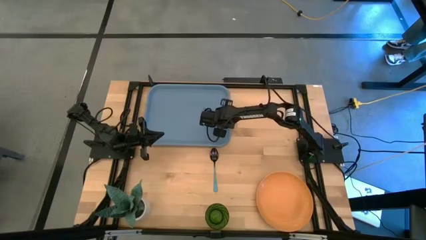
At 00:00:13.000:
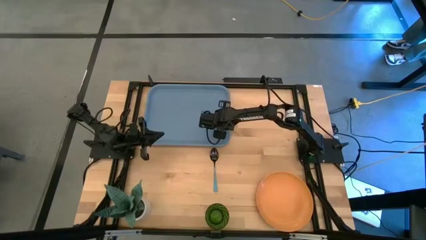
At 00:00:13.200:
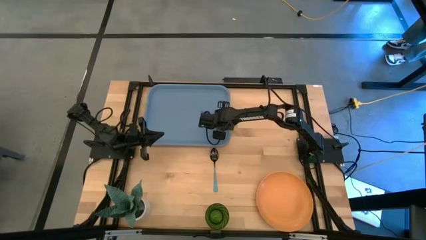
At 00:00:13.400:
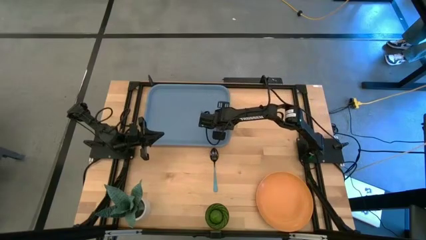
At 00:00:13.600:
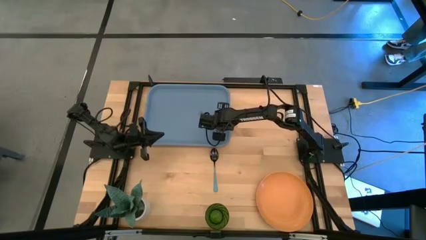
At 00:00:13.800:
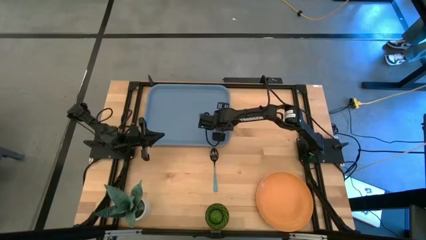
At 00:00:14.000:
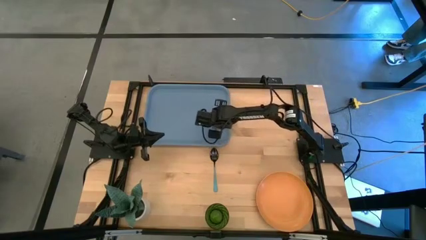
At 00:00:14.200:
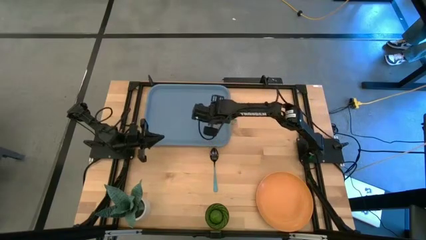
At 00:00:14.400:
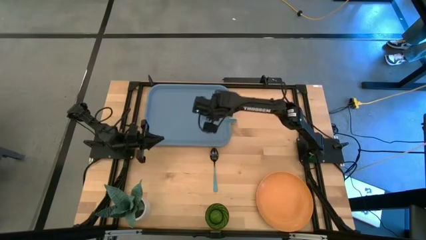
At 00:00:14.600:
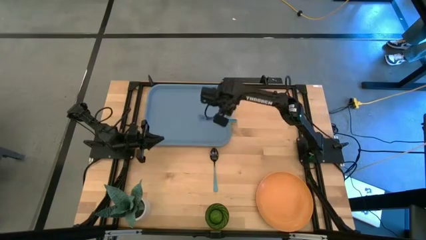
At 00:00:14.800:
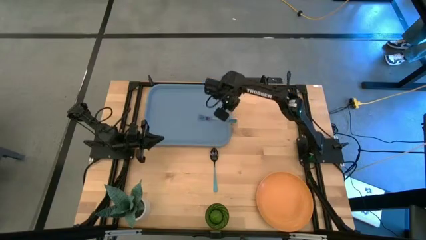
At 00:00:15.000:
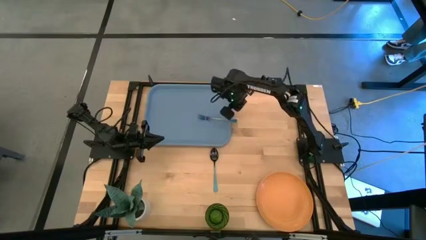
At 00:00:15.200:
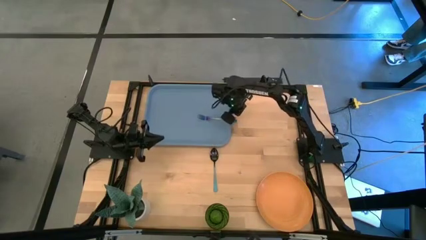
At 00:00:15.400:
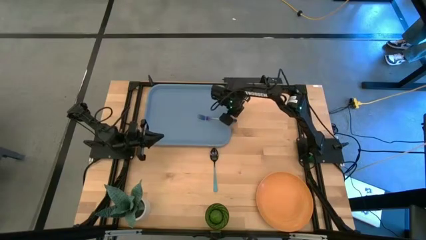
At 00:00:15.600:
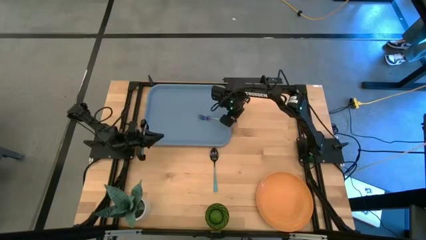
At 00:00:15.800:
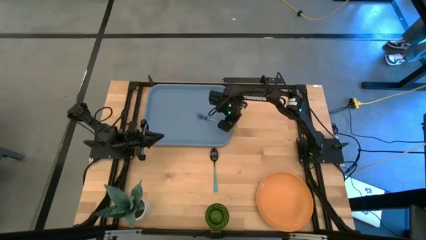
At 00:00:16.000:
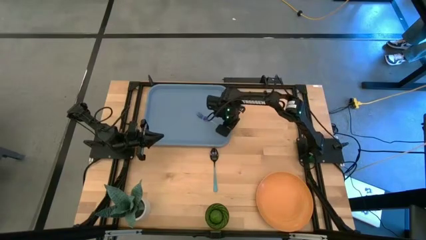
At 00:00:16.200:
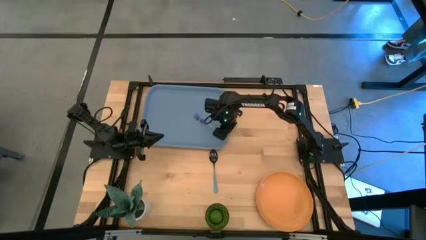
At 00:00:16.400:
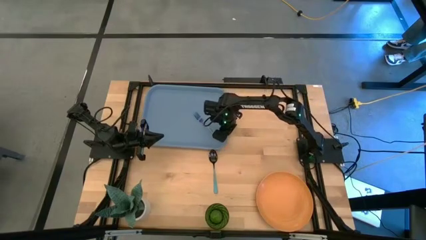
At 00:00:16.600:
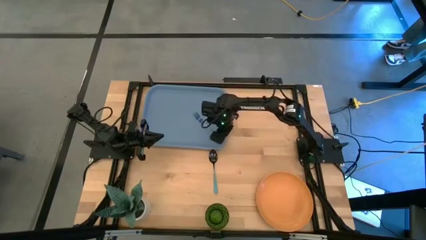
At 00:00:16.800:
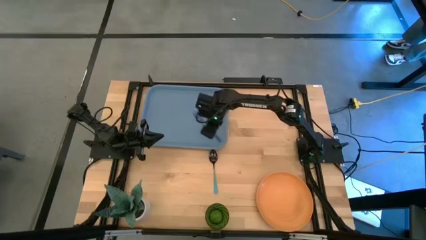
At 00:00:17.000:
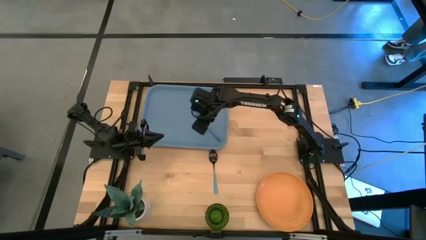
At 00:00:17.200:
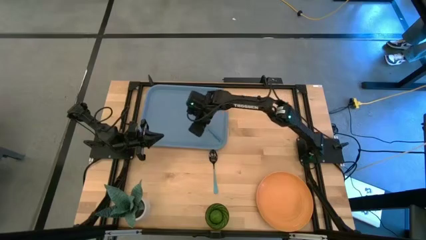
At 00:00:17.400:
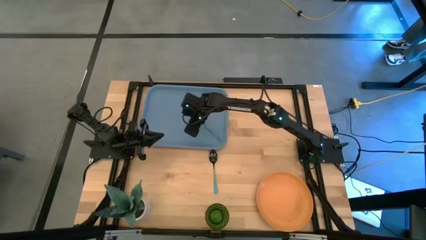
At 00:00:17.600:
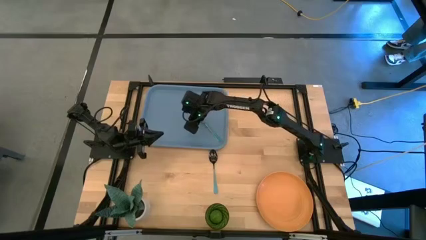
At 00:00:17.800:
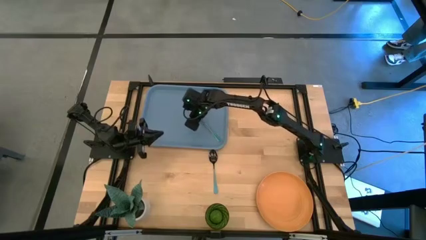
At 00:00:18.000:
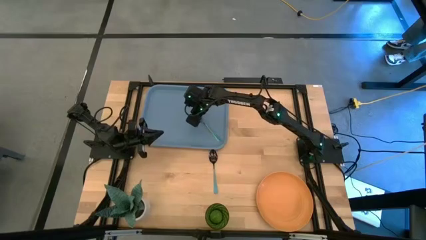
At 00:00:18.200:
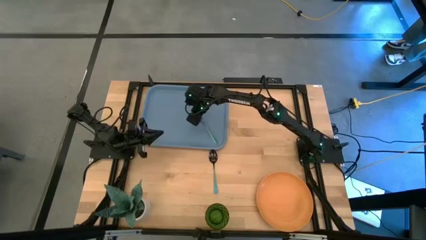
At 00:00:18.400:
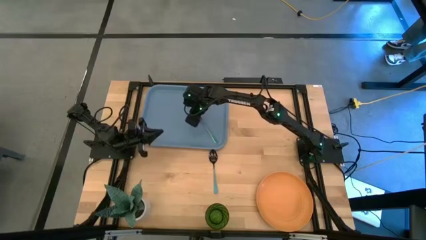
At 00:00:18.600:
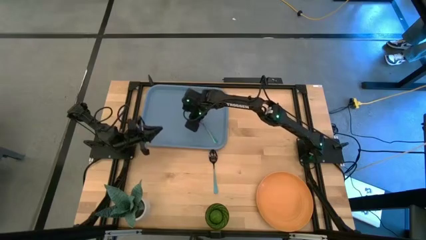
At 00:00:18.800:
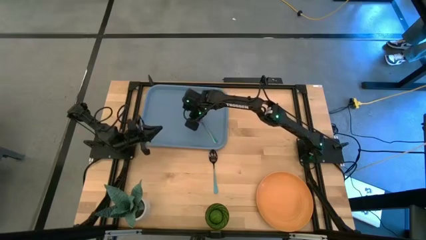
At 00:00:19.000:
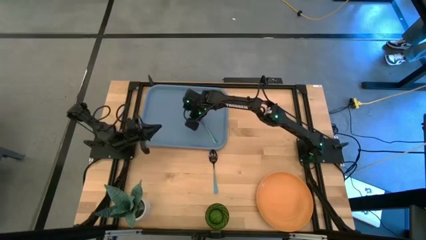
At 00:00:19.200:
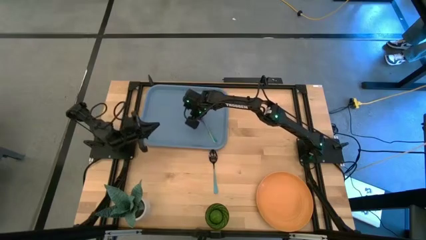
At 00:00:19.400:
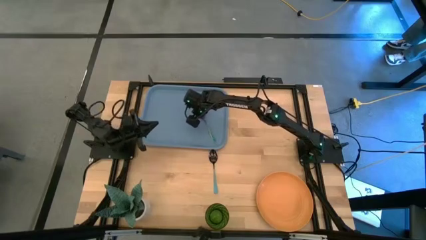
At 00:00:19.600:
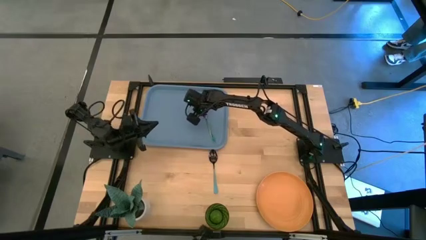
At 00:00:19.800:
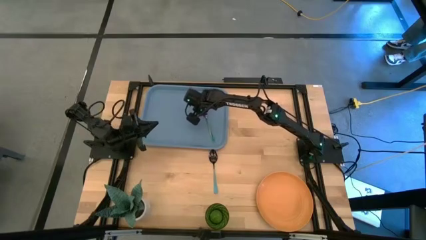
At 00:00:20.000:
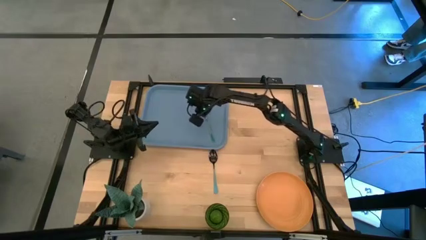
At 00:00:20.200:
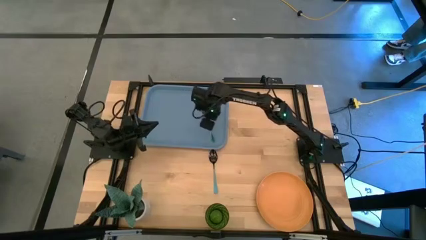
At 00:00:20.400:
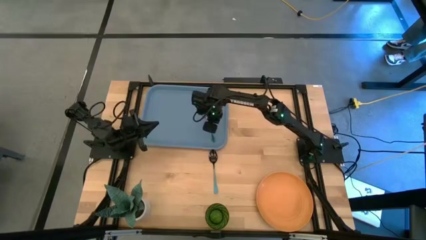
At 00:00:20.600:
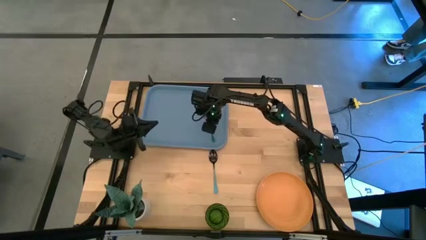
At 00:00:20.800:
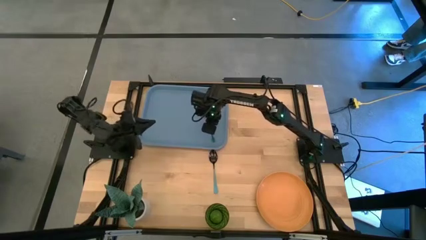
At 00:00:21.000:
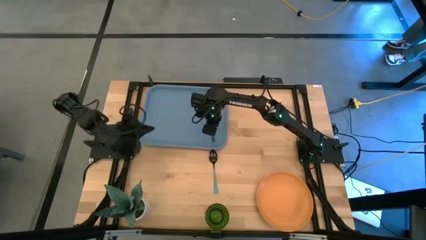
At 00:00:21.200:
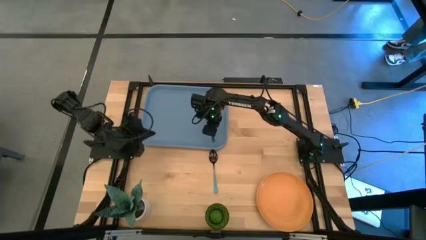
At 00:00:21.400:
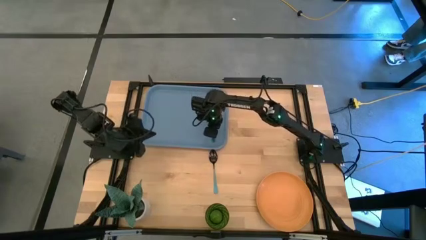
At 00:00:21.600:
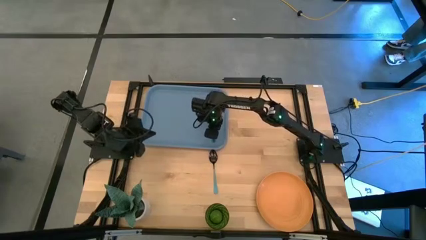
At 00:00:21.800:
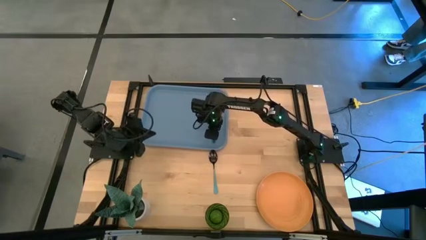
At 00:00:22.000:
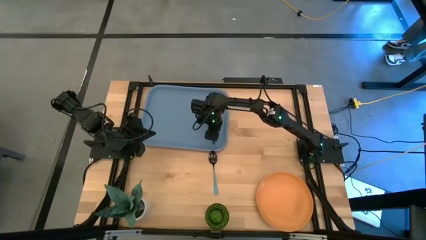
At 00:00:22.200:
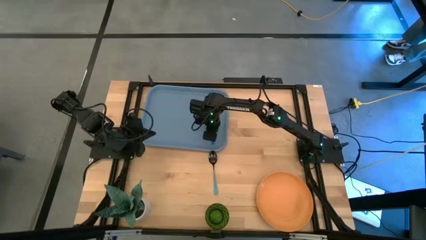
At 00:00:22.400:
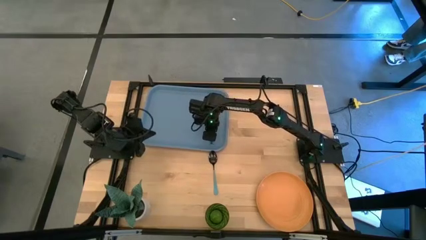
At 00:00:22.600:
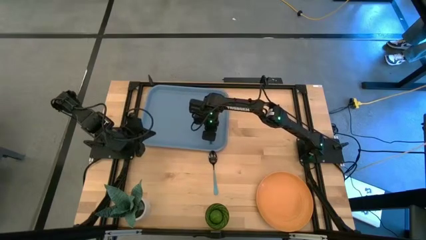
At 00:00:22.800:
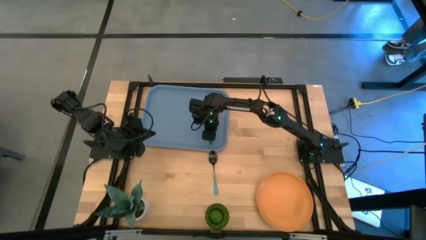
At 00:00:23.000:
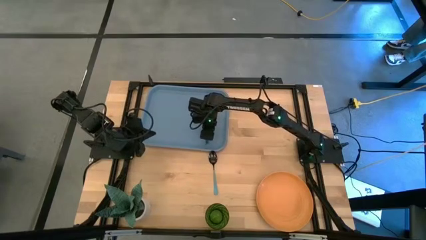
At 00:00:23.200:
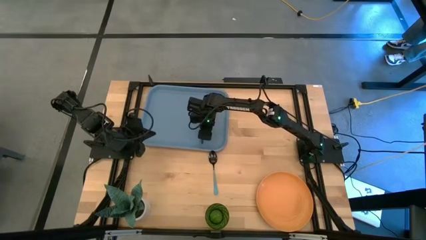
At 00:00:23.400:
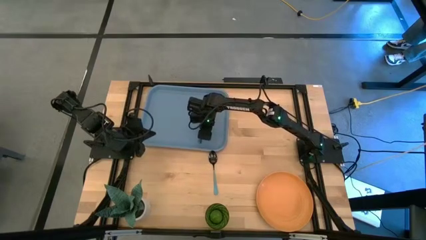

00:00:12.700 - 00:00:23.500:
Task: Pick and place plate/cup/fork/spoon on tray
Put the blue fork on the blue tray
